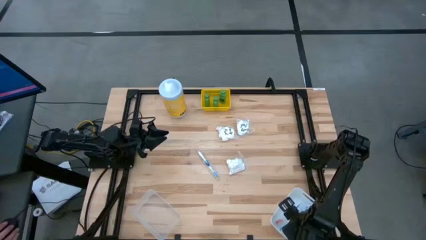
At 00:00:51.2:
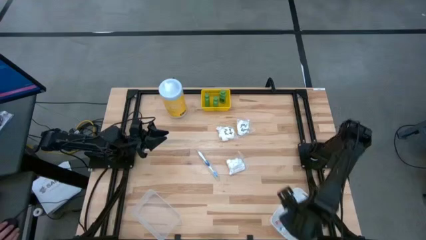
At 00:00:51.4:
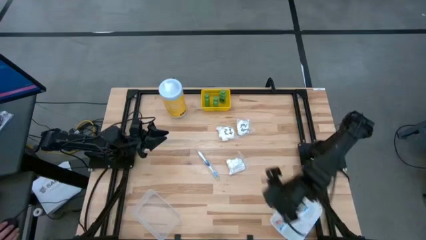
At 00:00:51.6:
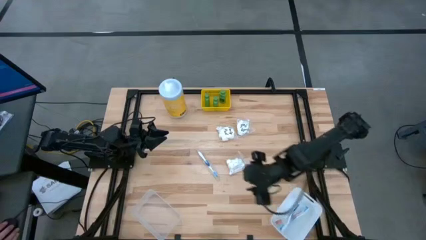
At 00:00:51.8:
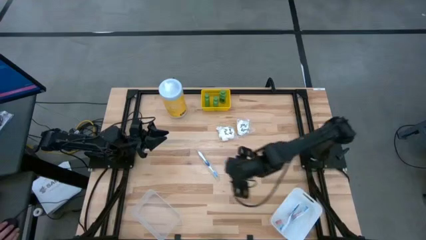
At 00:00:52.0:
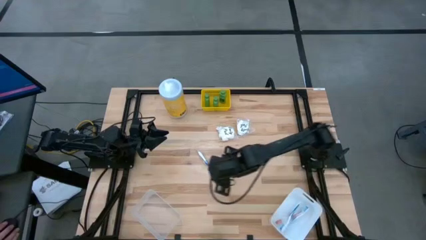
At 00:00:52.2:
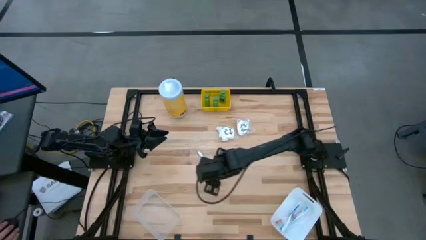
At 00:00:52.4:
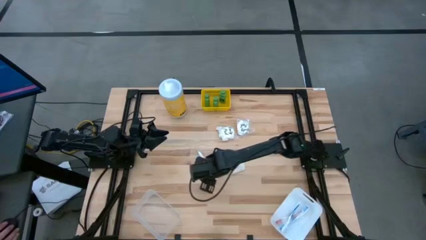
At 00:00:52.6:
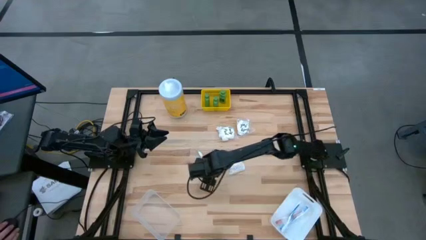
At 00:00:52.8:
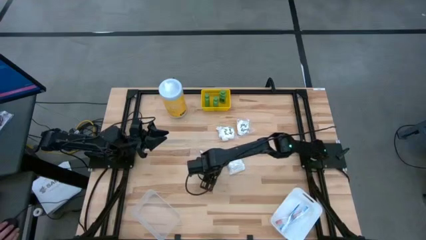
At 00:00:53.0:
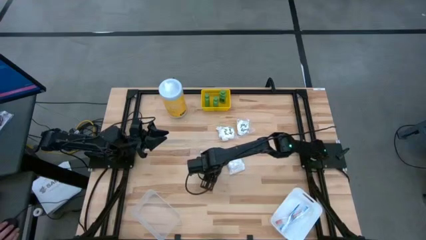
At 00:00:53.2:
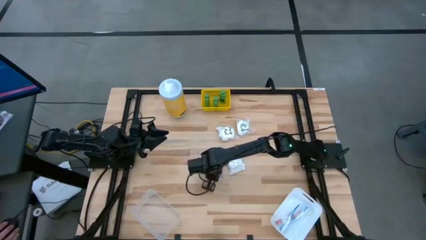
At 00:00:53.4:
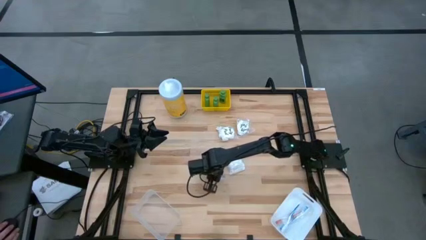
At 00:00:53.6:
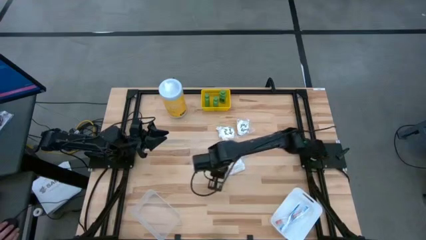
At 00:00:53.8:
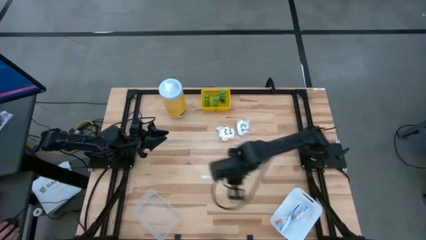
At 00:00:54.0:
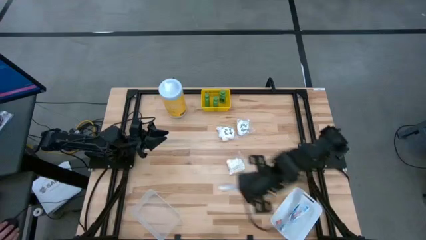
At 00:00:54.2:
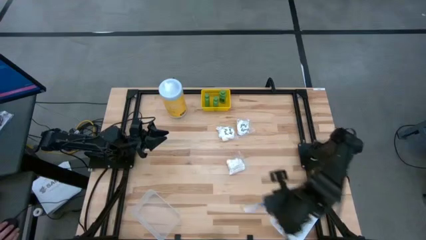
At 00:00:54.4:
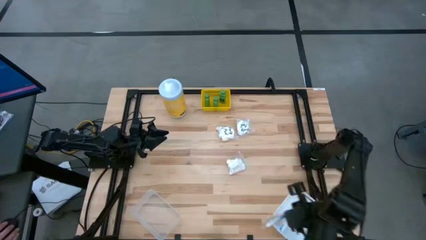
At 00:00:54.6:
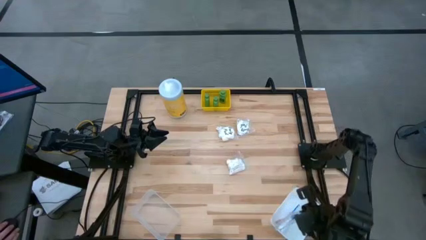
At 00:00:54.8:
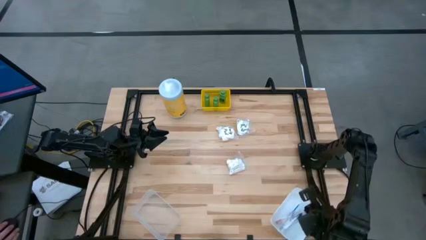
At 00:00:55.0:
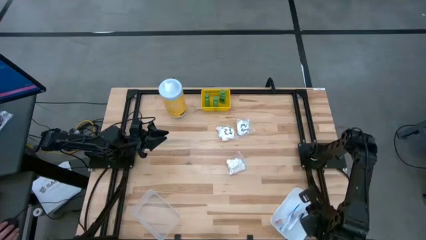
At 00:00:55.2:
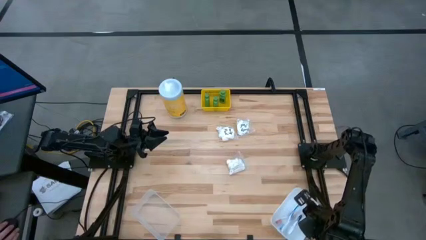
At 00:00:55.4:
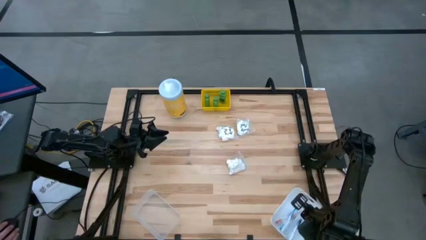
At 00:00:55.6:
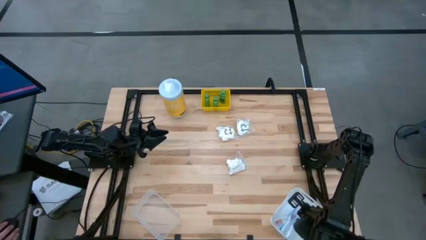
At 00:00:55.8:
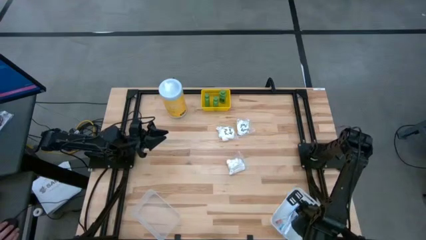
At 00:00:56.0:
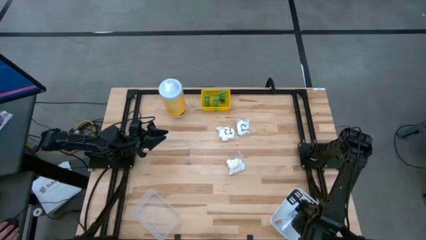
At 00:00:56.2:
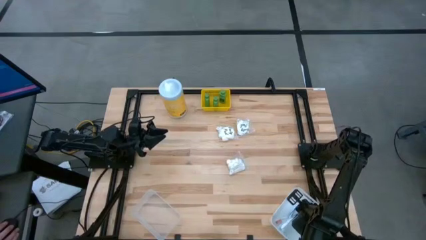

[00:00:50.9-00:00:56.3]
Task: Pick & Place Travel size toiletries
Put the dark blue toothbrush into the white bin

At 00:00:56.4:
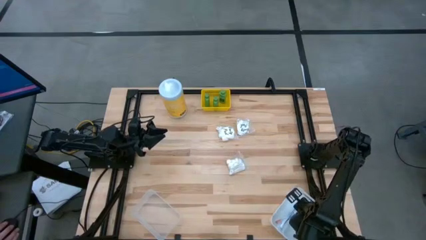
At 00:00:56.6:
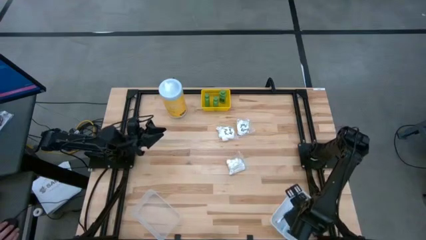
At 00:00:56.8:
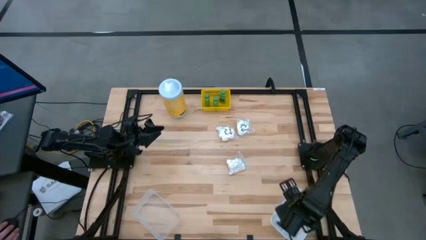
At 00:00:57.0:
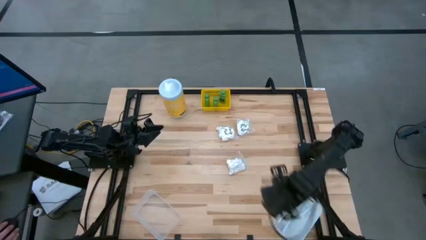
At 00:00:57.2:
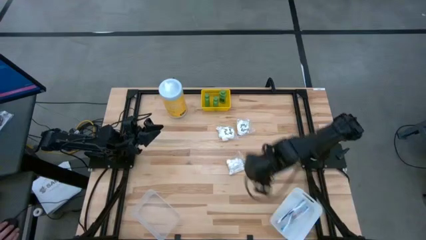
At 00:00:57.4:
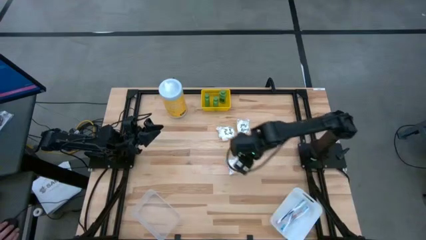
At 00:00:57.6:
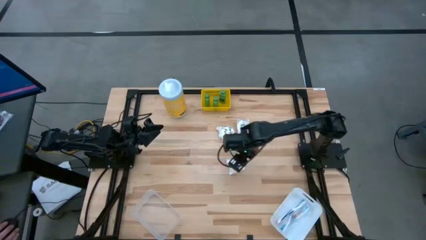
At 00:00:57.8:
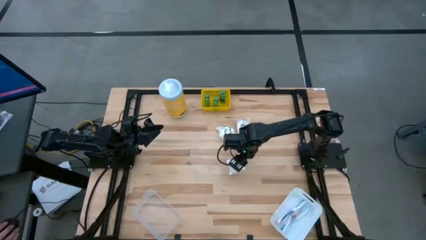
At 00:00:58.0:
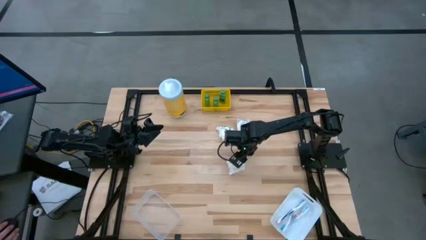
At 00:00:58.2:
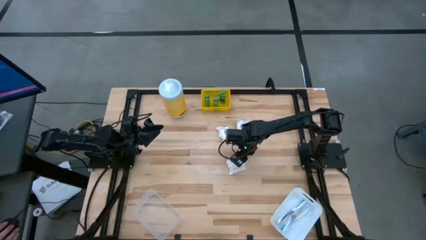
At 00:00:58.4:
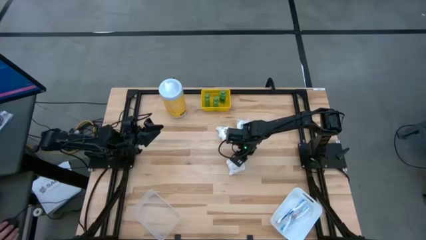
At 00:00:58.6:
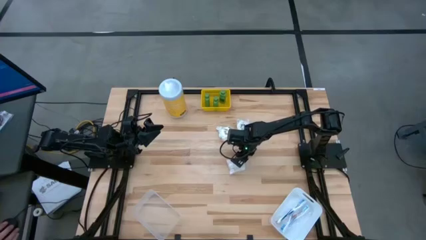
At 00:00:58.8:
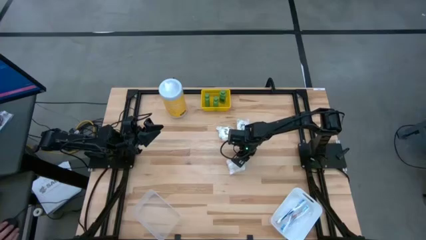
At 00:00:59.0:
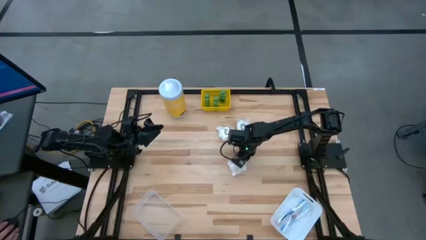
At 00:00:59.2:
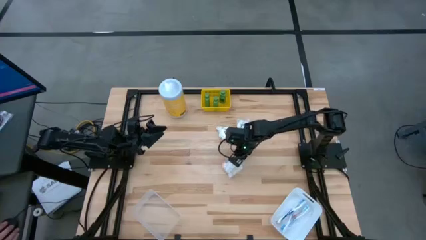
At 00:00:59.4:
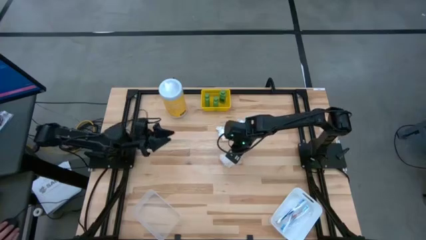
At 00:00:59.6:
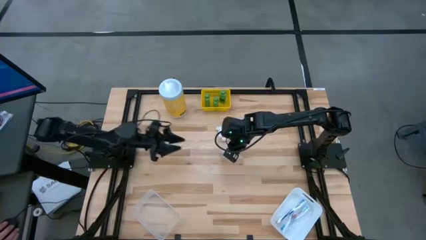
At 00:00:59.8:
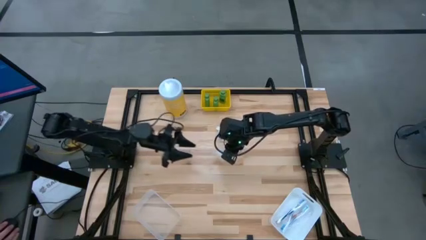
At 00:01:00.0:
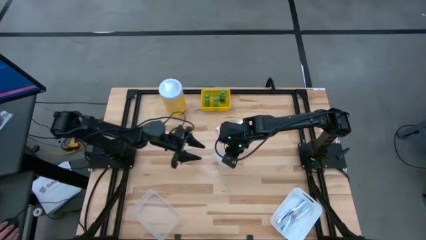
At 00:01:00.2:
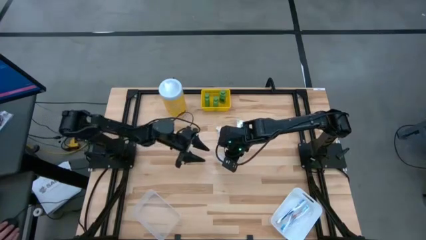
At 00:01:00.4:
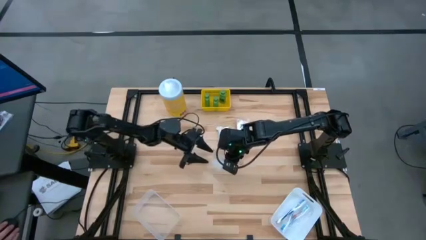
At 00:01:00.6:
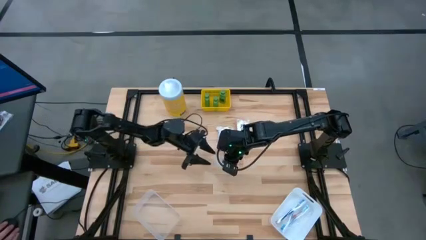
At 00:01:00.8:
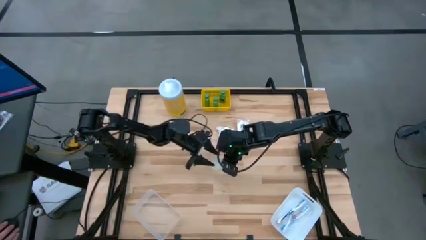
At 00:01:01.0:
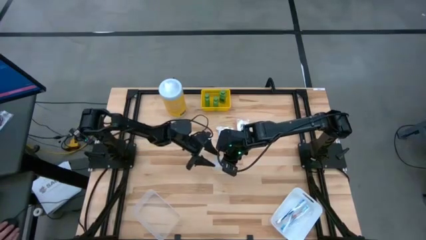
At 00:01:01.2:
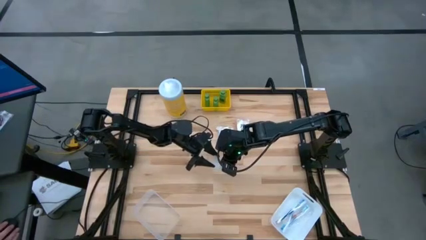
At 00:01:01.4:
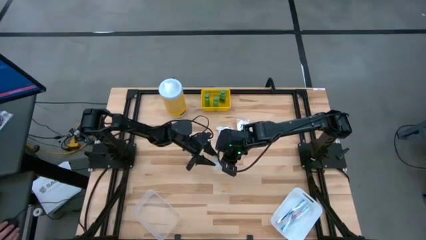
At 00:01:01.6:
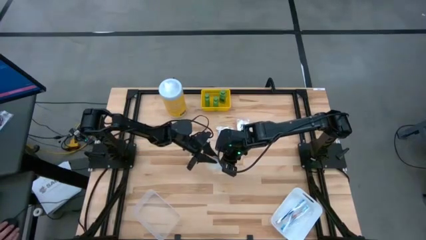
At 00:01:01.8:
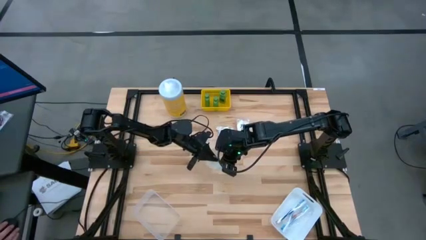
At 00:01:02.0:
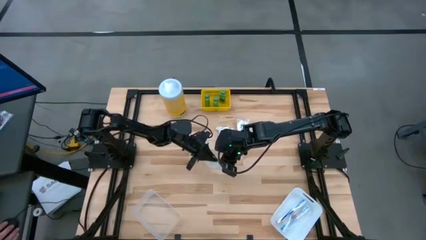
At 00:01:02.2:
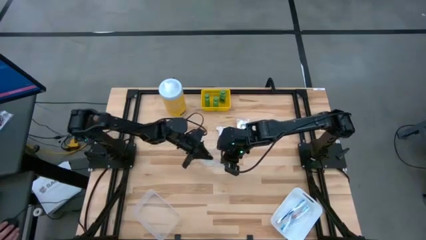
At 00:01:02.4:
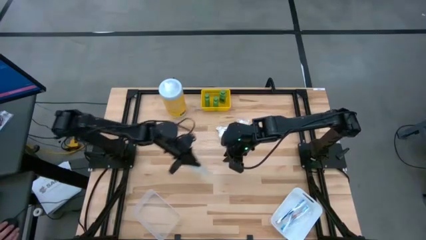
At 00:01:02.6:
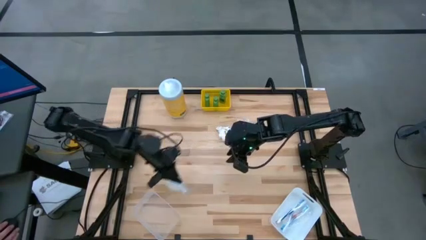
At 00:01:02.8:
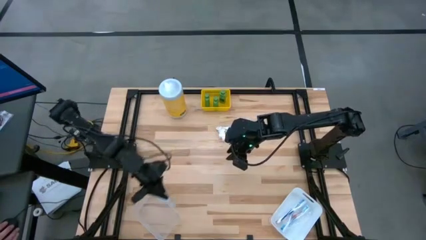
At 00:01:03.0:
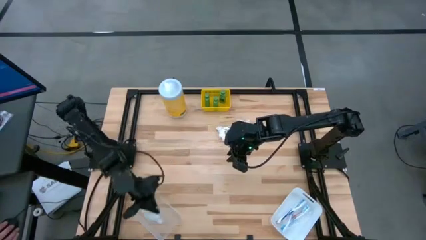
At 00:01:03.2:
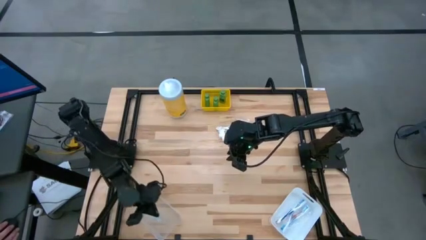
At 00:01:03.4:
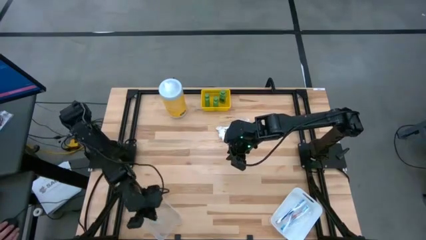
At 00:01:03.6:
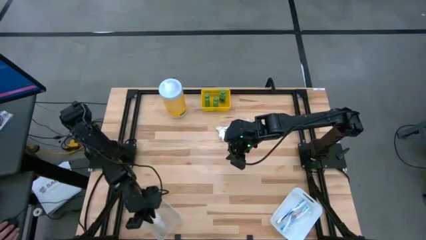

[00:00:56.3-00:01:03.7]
Put the bottom white cotton pack into the transparent bin
